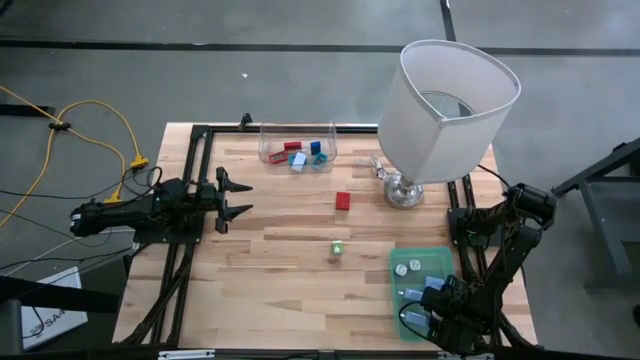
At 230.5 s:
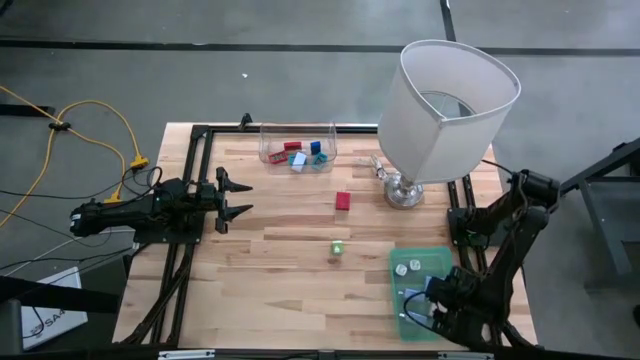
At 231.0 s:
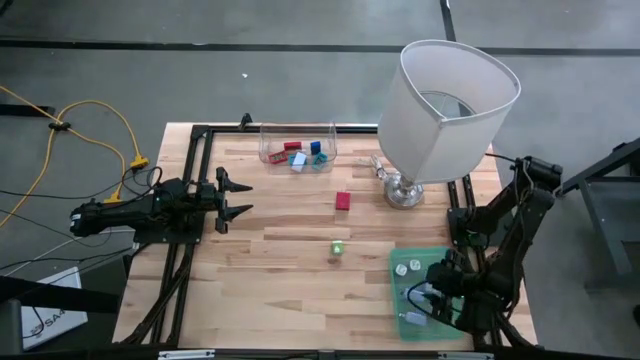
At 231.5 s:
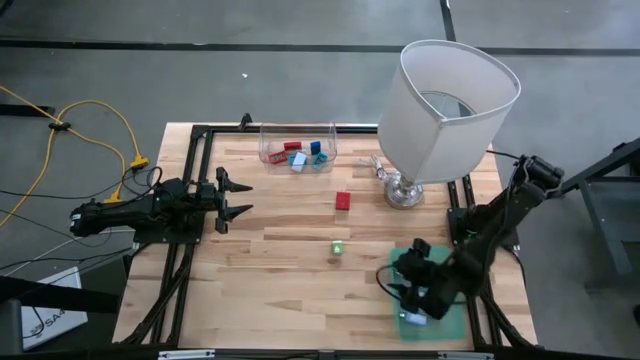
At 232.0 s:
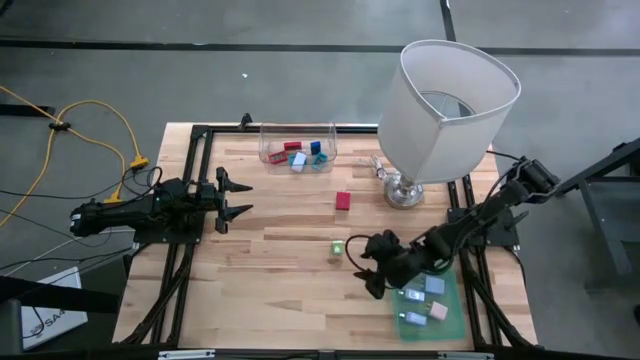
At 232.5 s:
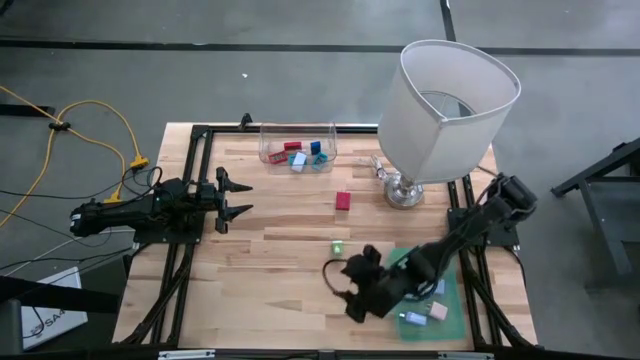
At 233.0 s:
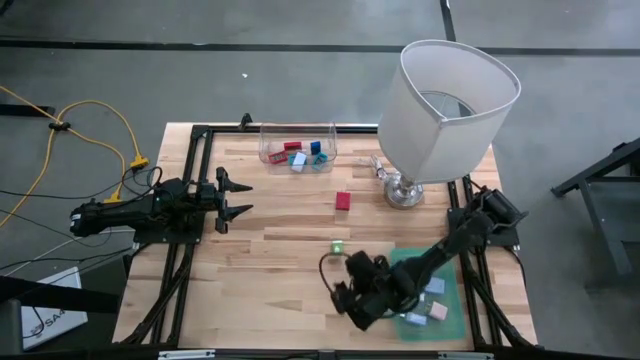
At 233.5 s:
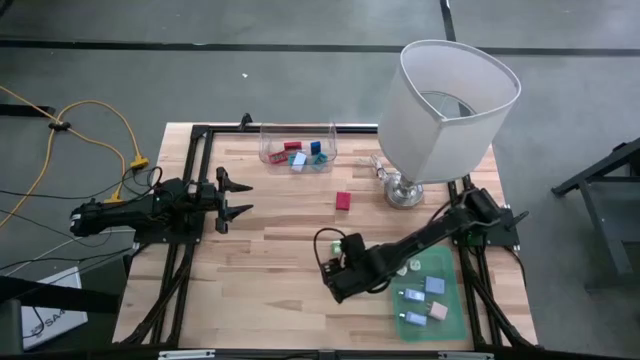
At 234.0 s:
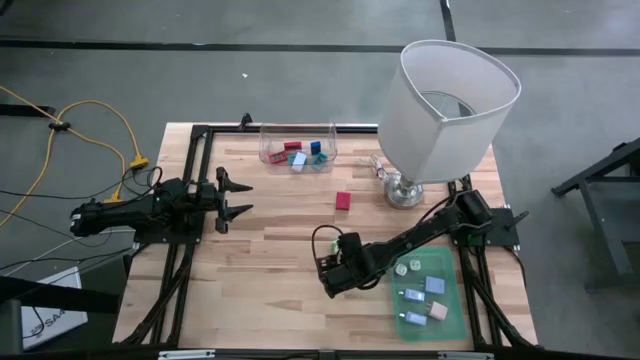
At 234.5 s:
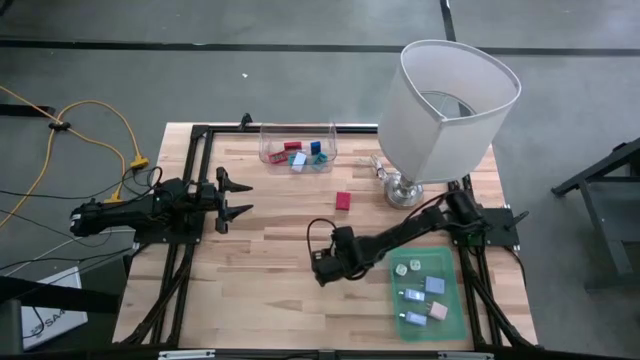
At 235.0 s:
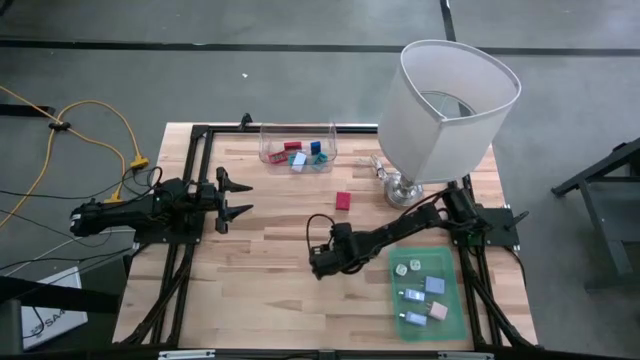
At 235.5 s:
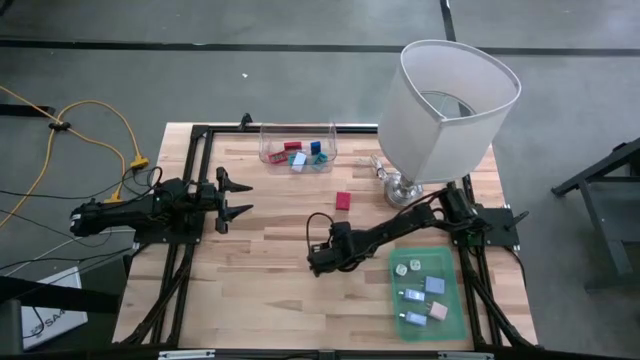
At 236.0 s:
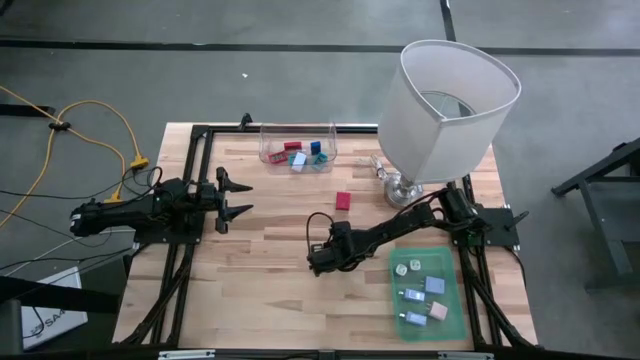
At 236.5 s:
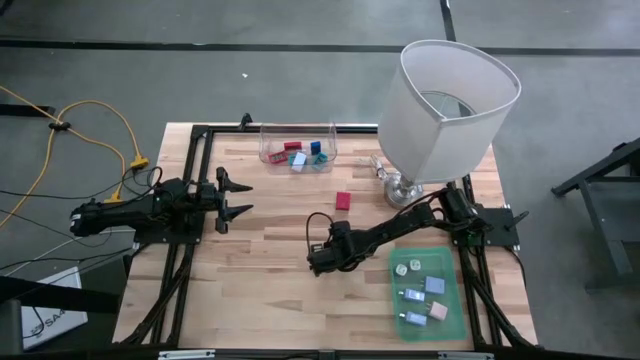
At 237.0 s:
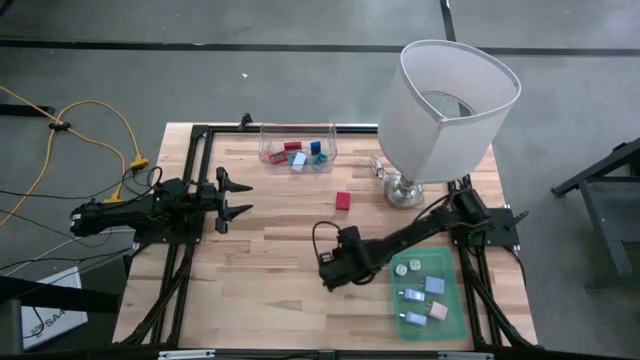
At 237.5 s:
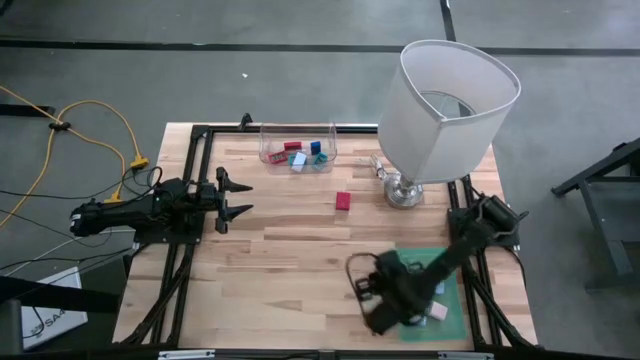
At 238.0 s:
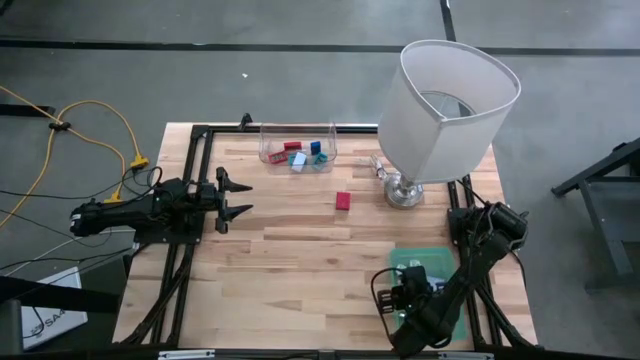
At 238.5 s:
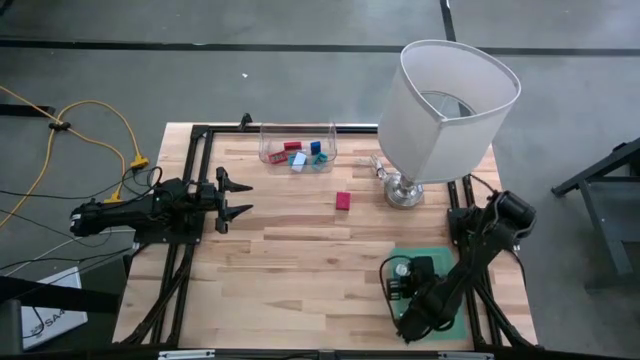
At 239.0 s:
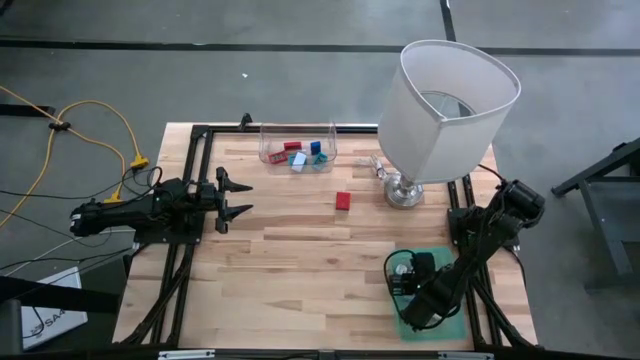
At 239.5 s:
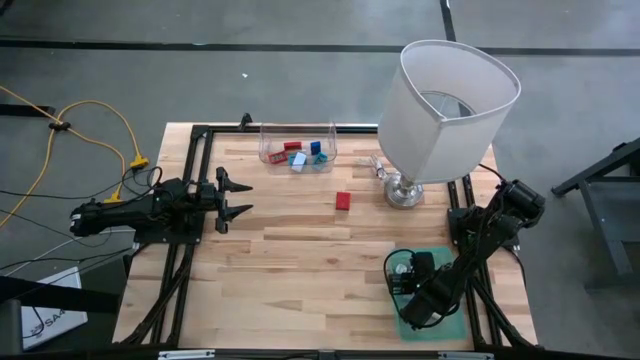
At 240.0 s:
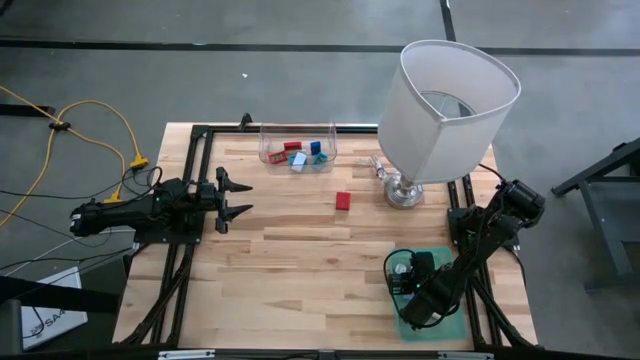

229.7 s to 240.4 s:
Task: Pick & Place Office items
Put the green charger adapter into the green bin

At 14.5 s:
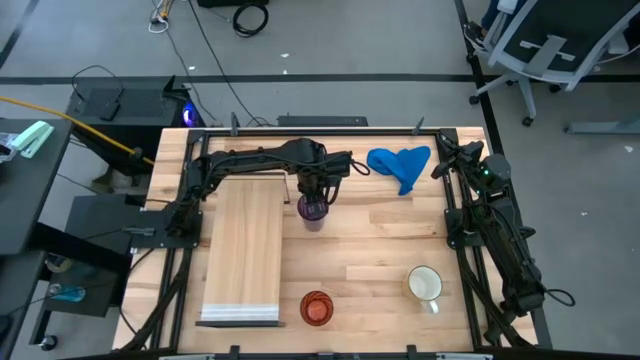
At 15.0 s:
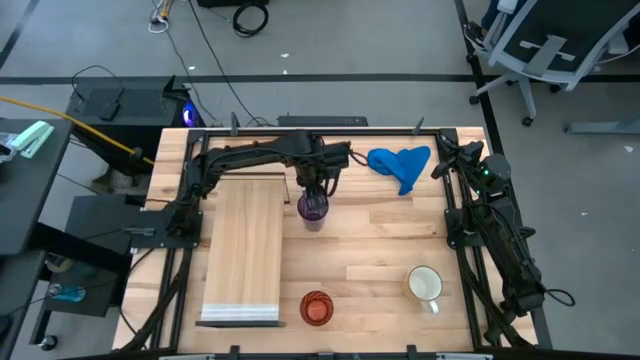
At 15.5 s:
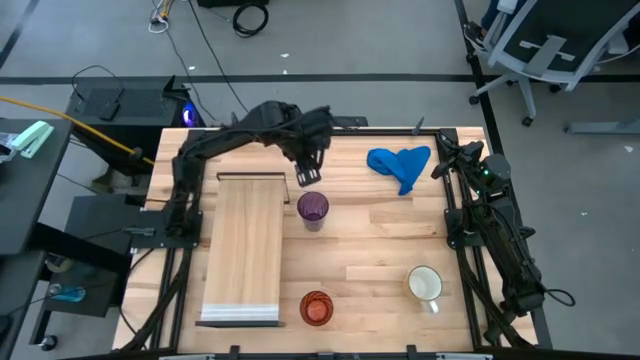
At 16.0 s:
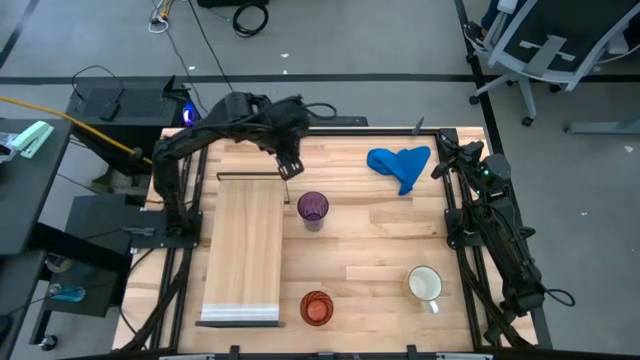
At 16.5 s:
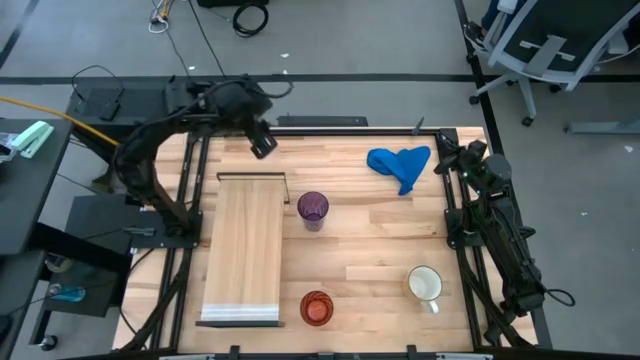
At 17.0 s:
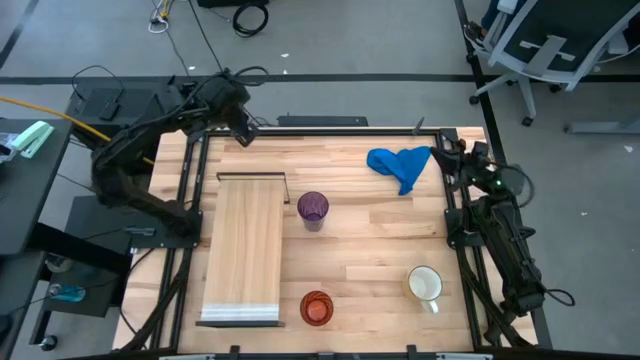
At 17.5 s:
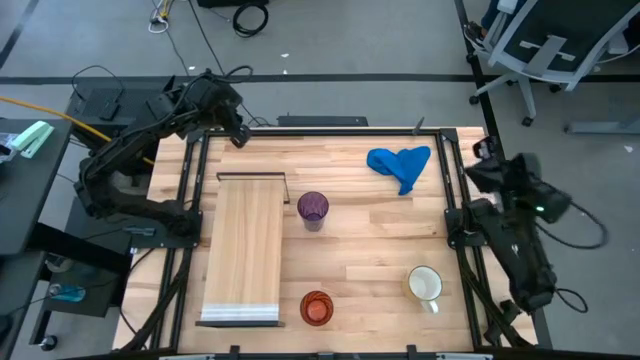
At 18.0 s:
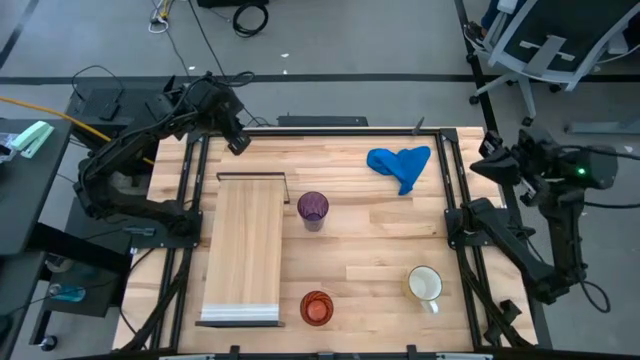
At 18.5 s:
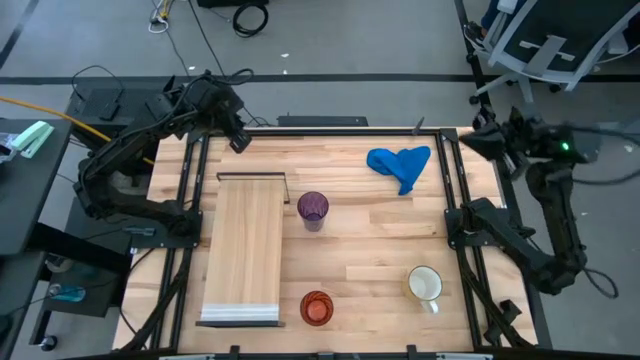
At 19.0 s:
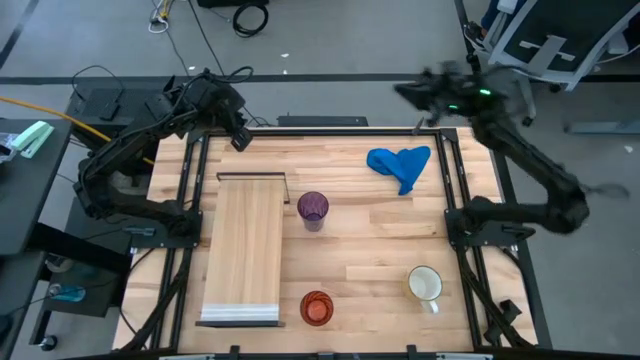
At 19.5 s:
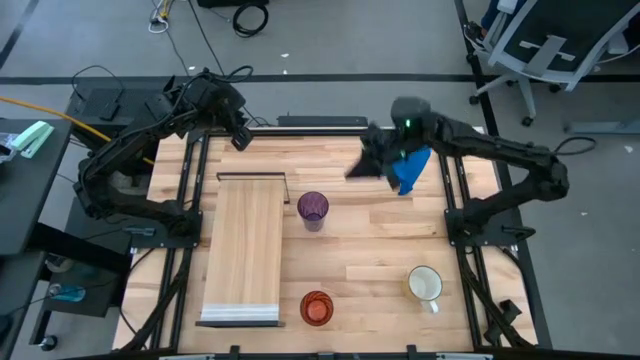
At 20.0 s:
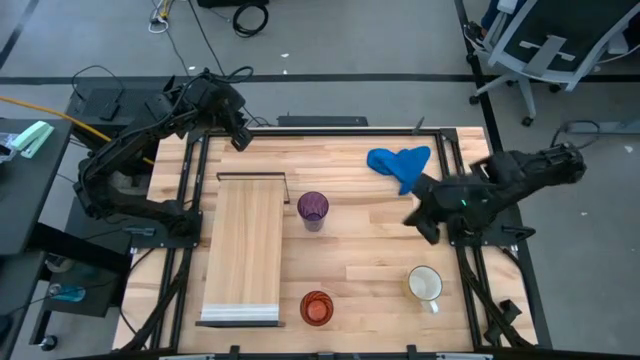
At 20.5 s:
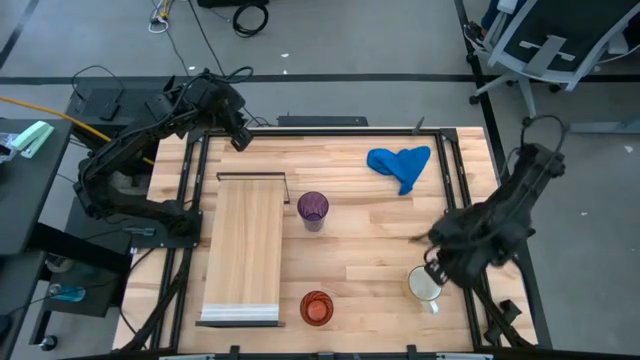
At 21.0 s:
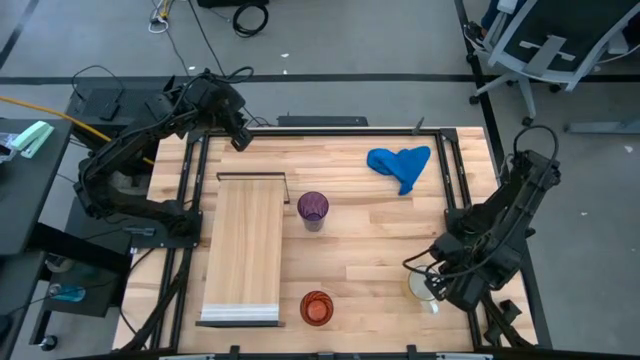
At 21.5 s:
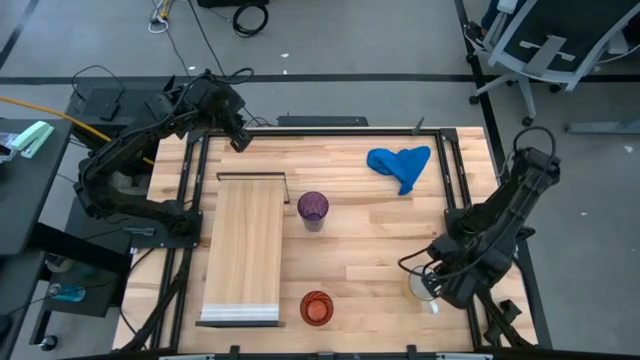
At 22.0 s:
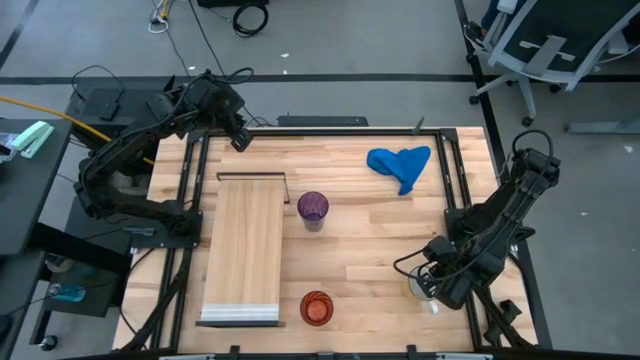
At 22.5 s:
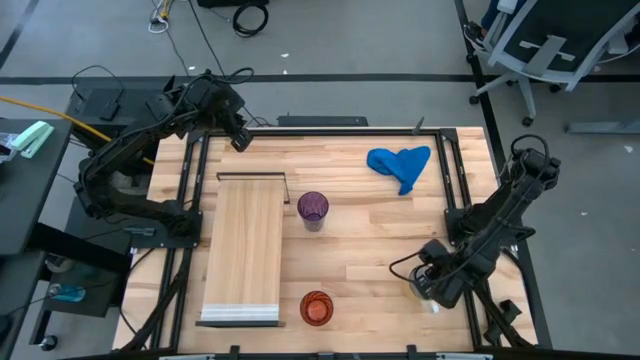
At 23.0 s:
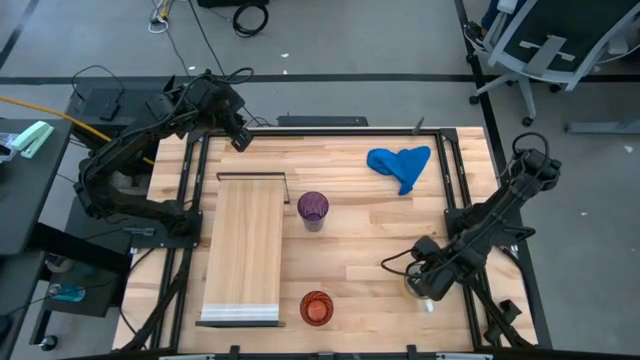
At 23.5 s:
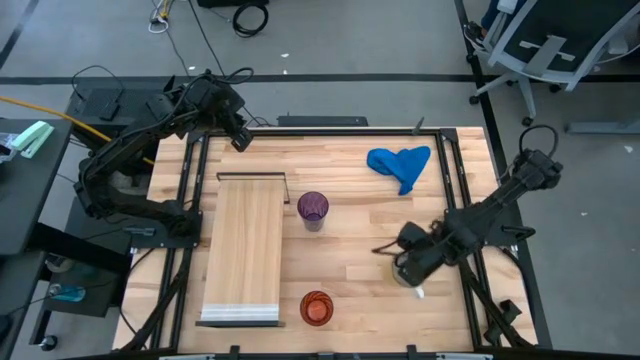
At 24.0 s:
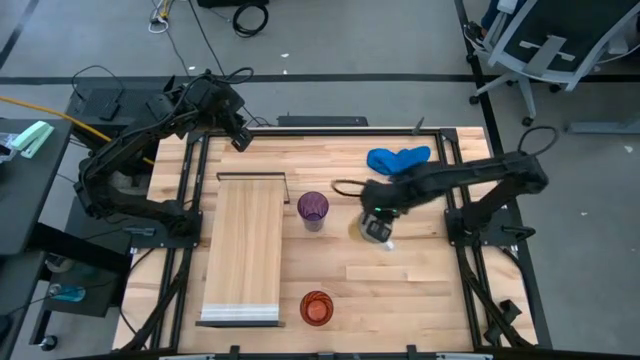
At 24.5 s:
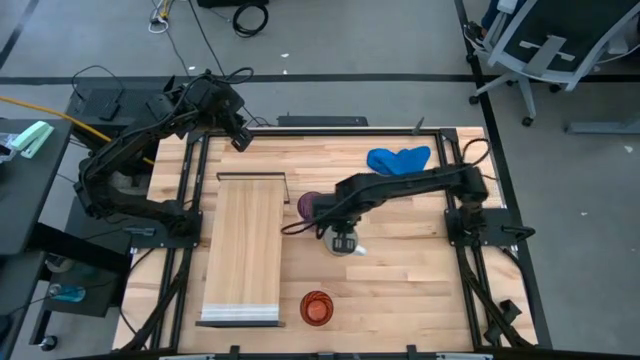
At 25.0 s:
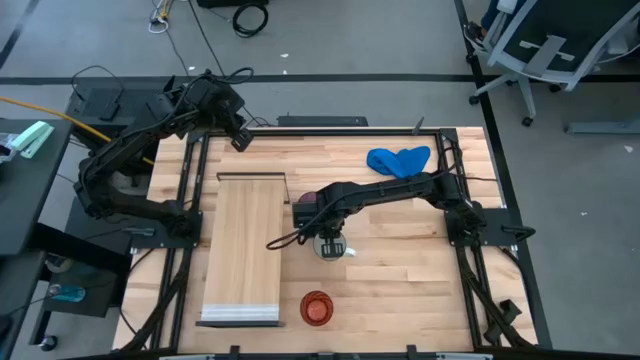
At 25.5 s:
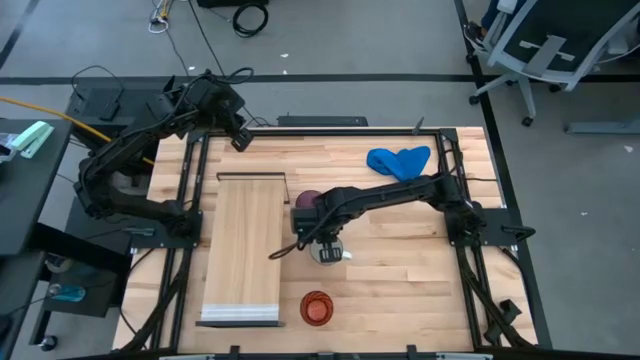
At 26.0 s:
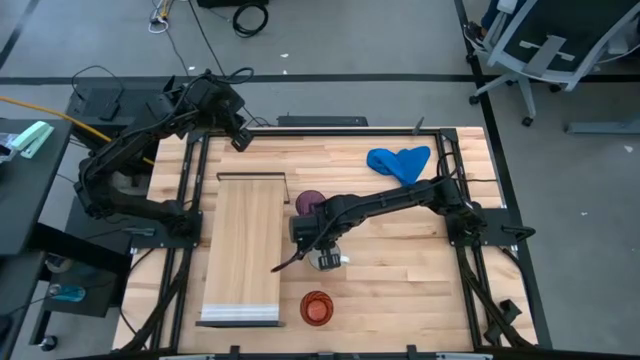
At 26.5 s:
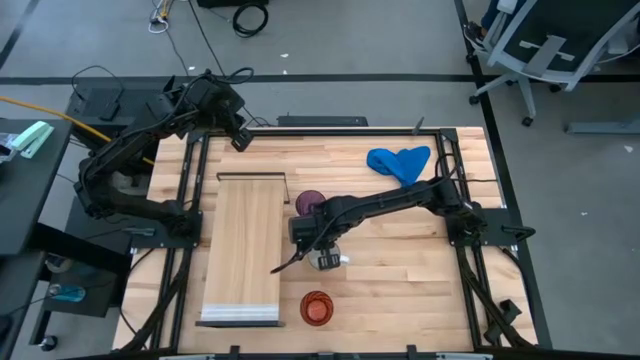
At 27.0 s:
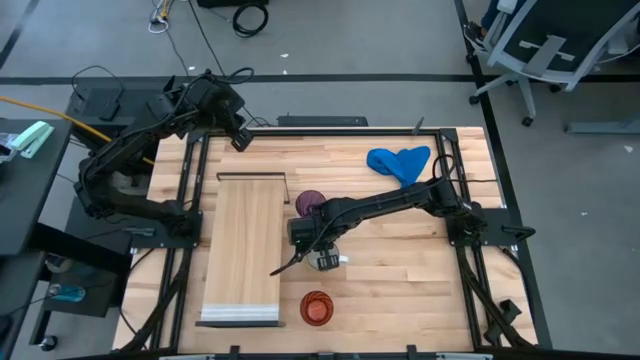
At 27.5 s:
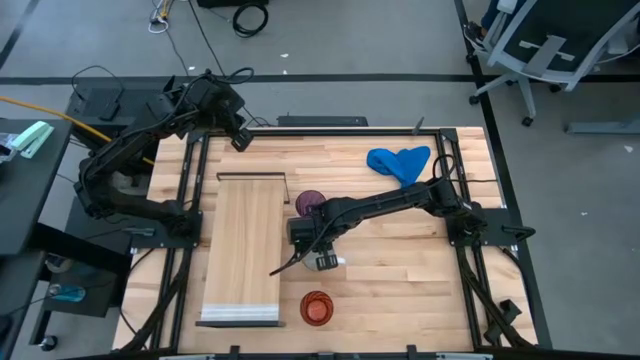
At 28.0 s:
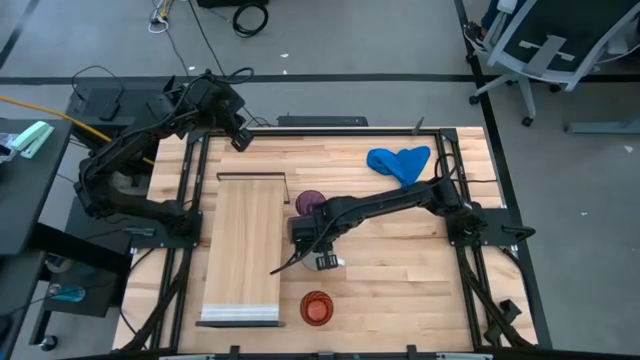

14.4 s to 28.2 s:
Task: Stack small to large cups/mugs on shelf
Move the yellow mug to the center of the table
